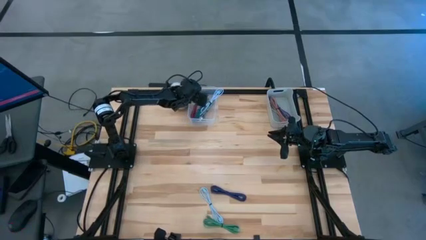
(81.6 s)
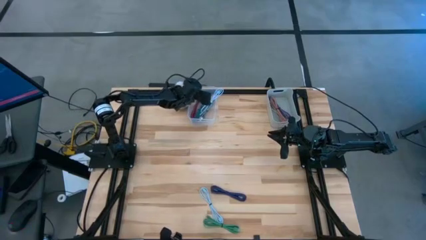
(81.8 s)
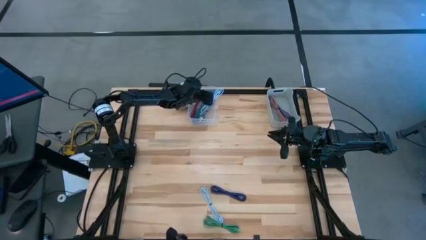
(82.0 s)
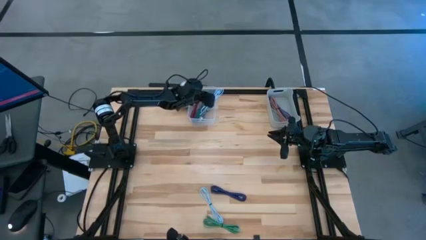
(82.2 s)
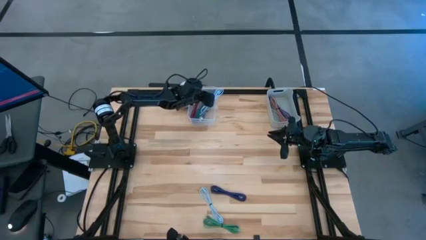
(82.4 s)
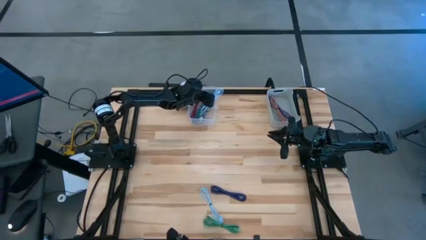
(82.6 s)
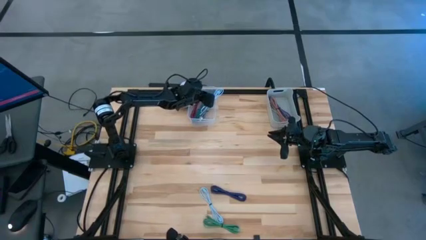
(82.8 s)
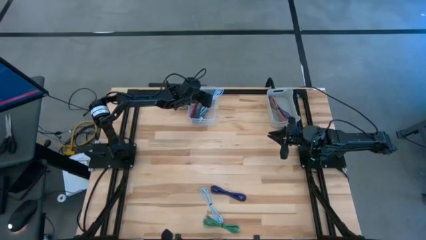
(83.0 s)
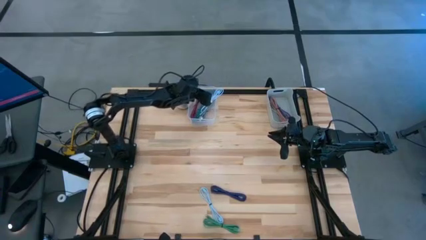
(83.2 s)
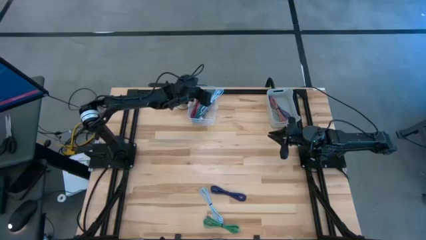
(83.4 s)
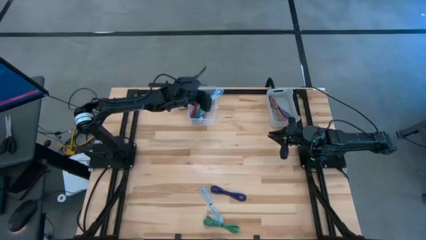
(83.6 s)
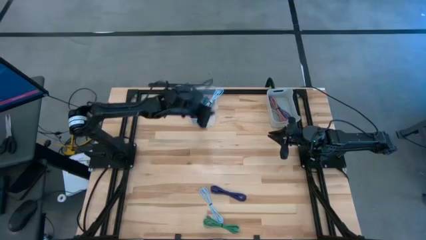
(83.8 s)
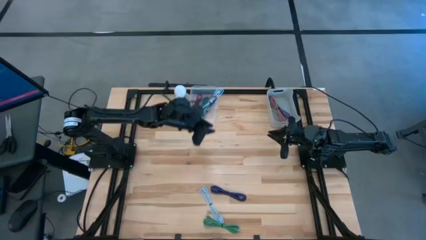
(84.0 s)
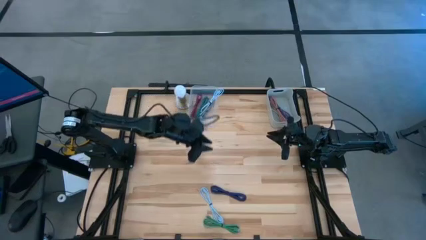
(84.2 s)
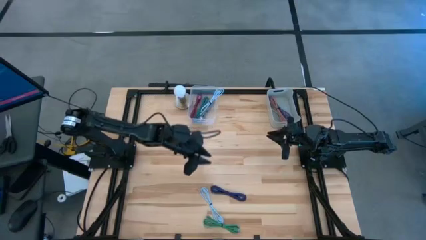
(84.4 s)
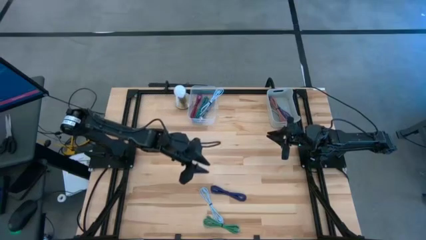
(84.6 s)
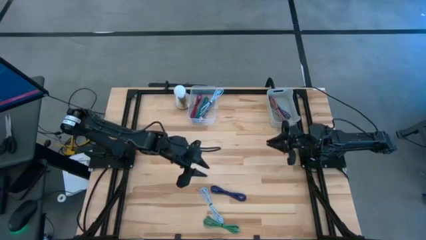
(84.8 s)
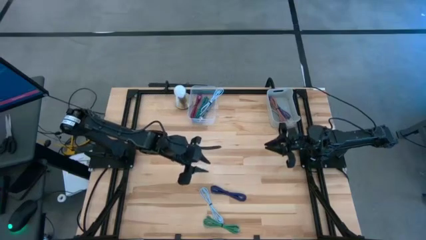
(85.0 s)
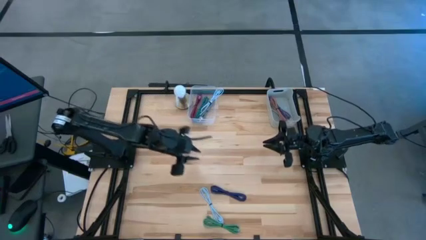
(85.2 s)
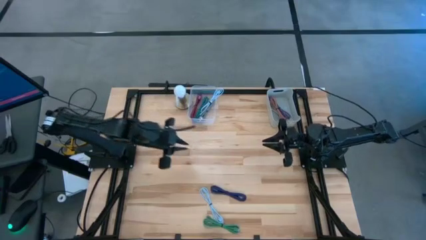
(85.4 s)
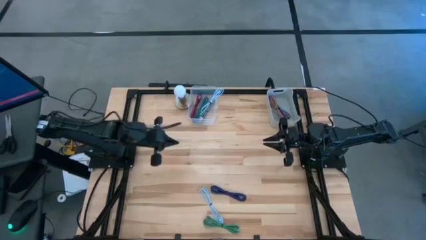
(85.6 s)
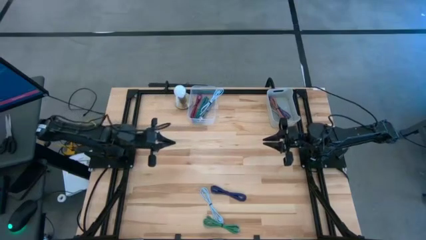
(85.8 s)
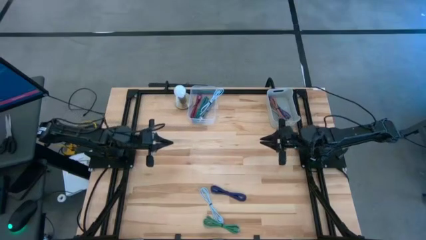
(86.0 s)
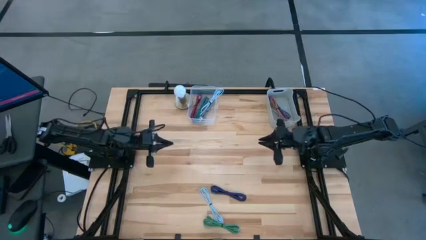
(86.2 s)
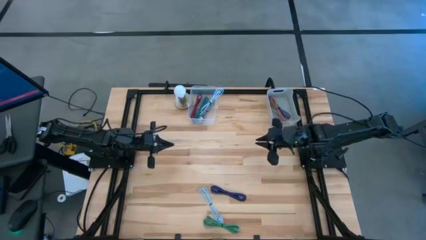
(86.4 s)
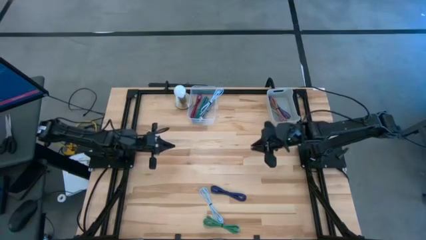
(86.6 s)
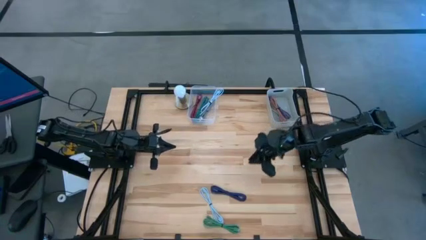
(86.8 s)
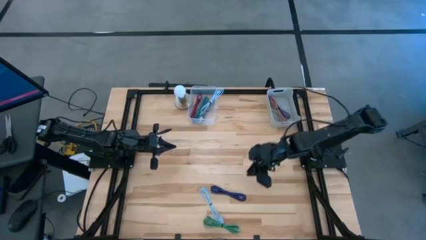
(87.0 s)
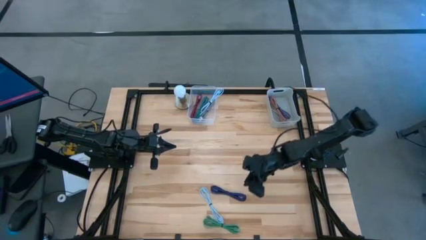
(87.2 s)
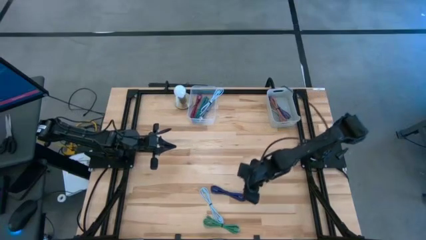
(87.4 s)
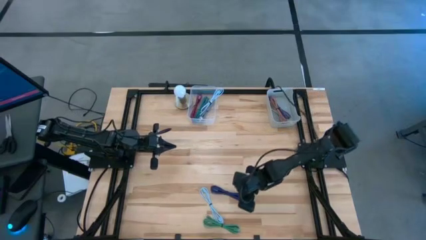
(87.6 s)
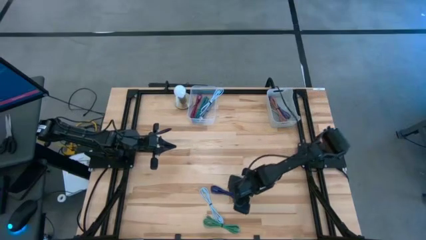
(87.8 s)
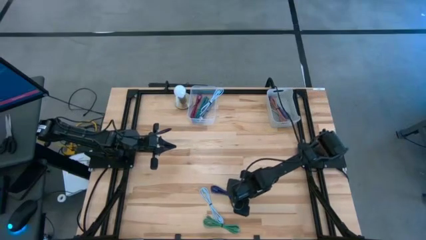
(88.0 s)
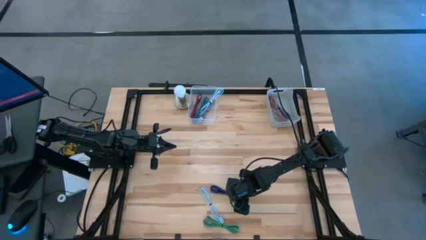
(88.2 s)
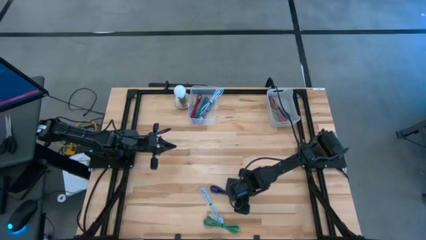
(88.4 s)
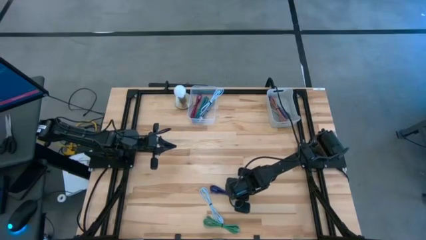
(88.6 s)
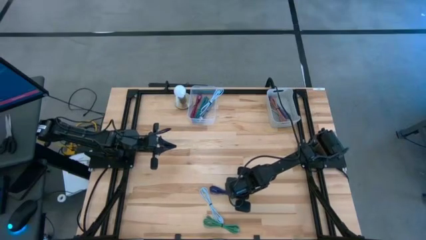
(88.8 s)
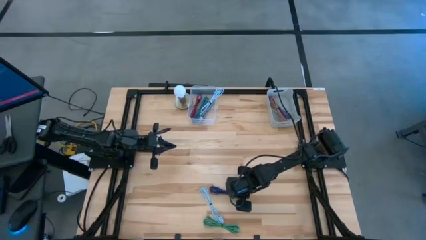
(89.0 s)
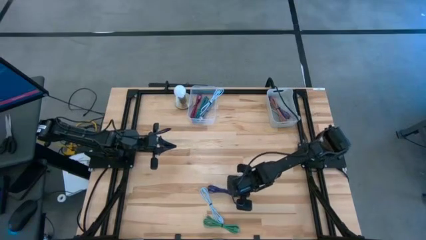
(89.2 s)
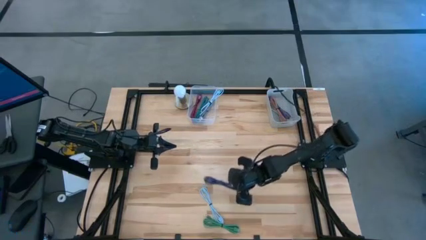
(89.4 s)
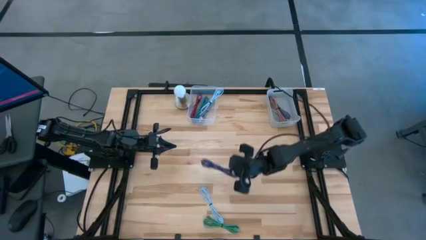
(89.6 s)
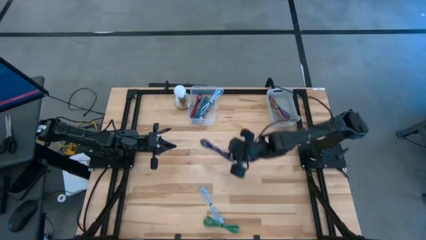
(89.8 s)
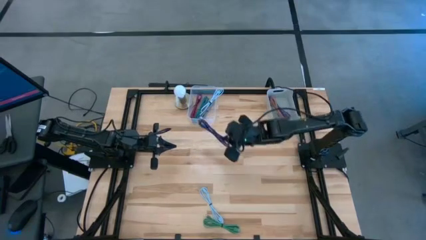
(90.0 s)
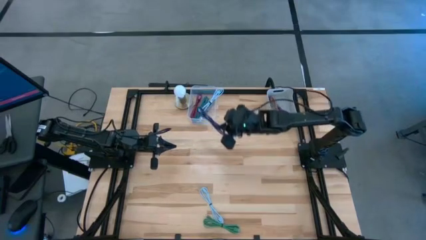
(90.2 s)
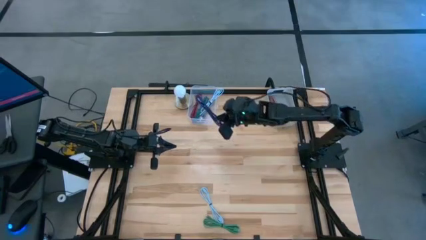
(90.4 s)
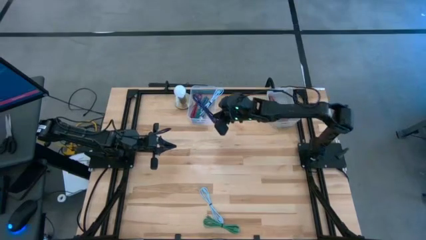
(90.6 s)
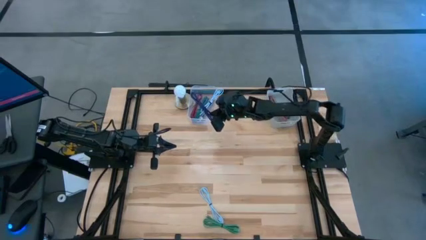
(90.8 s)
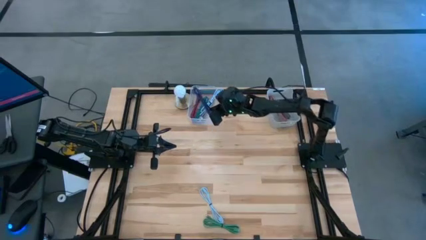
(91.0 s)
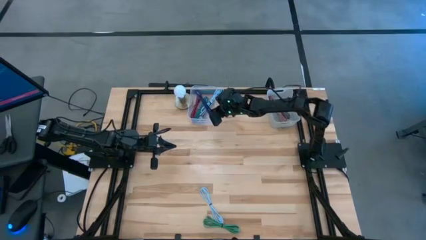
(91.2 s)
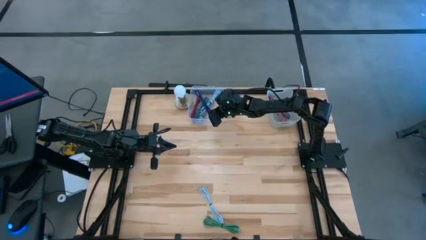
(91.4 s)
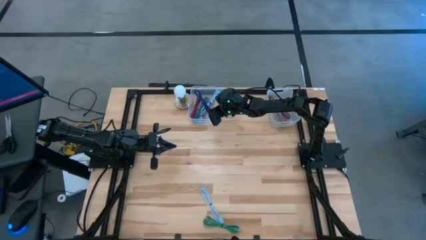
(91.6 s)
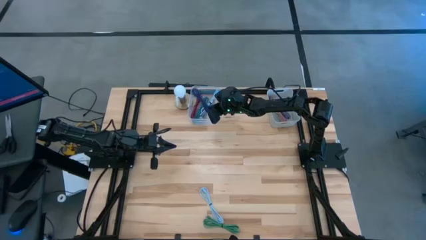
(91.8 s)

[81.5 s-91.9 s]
Task: Pick & Place USB Port
Put the black purple charger cable into the transparent bin

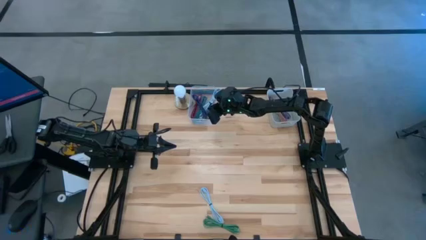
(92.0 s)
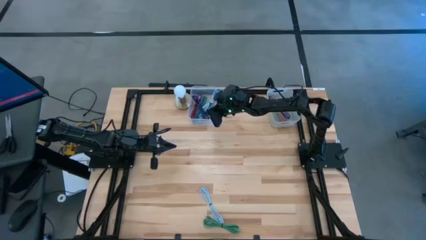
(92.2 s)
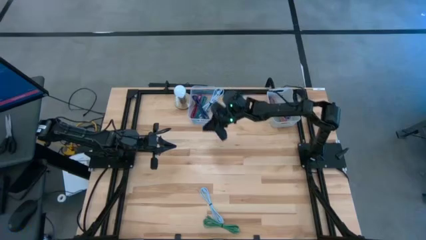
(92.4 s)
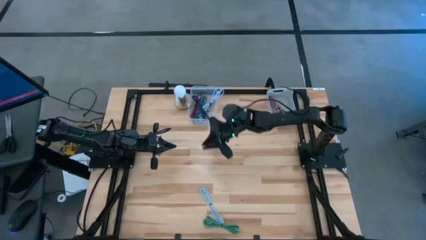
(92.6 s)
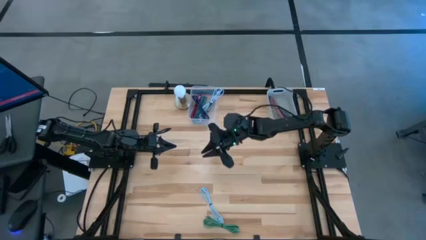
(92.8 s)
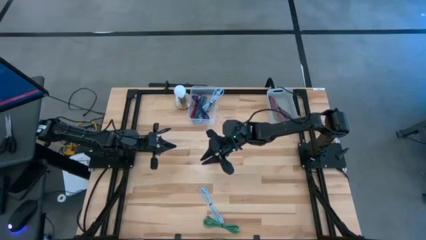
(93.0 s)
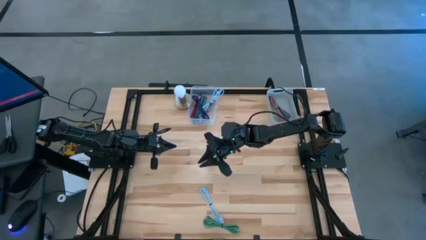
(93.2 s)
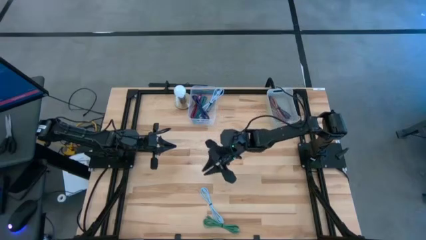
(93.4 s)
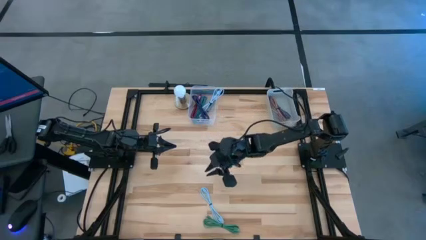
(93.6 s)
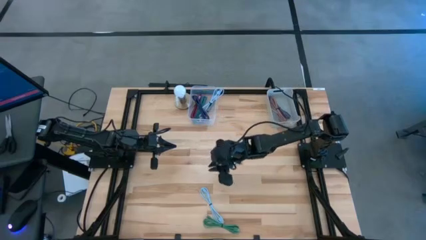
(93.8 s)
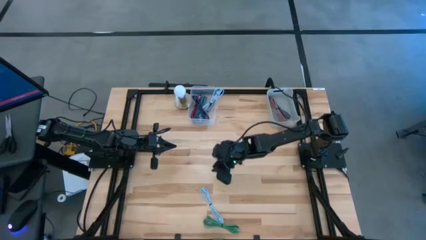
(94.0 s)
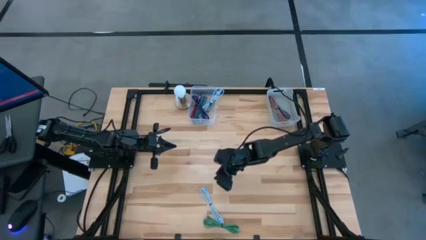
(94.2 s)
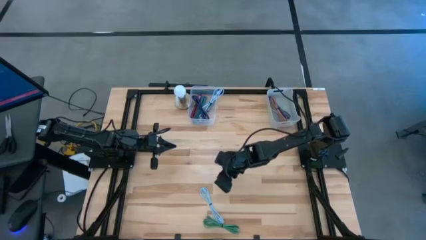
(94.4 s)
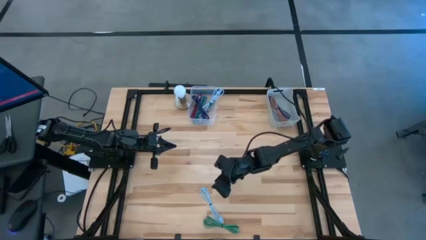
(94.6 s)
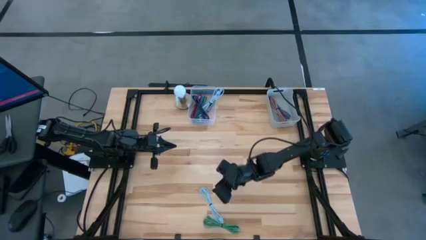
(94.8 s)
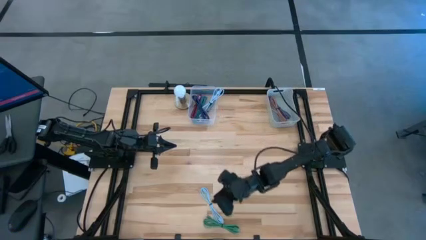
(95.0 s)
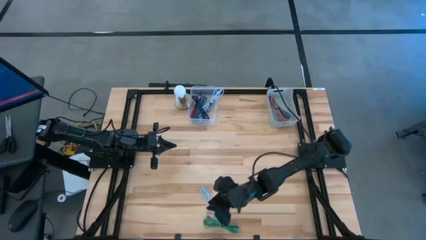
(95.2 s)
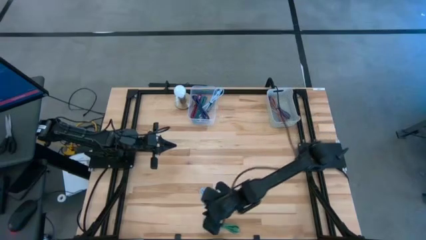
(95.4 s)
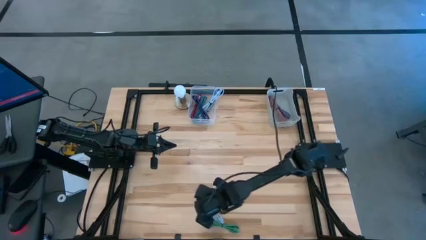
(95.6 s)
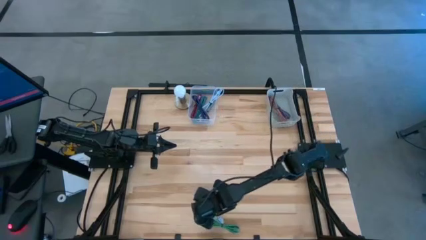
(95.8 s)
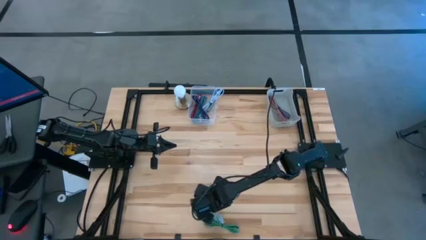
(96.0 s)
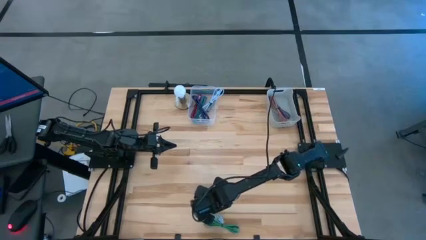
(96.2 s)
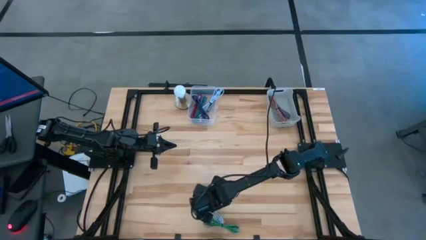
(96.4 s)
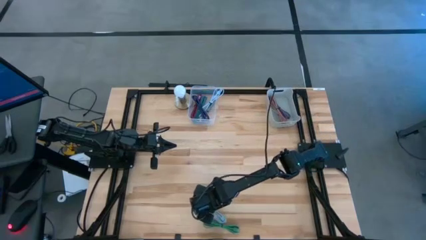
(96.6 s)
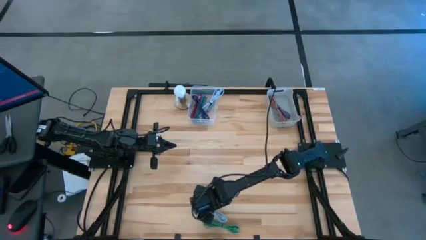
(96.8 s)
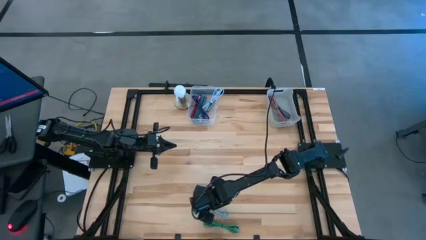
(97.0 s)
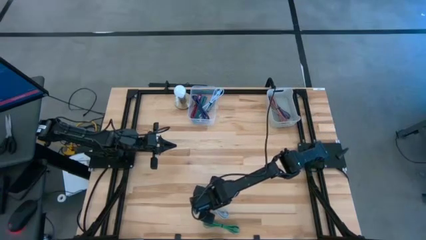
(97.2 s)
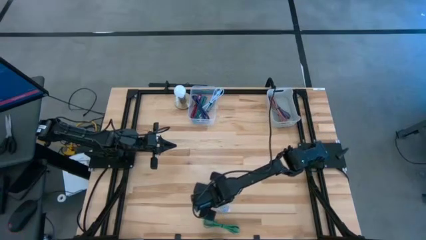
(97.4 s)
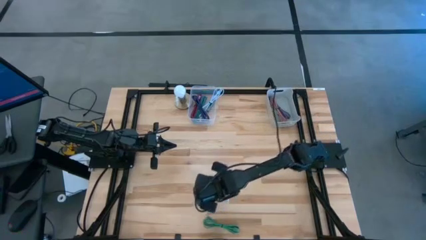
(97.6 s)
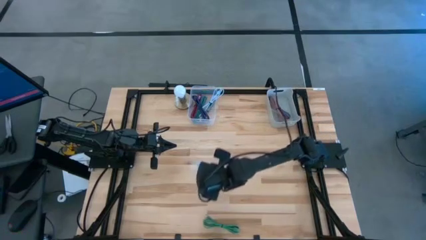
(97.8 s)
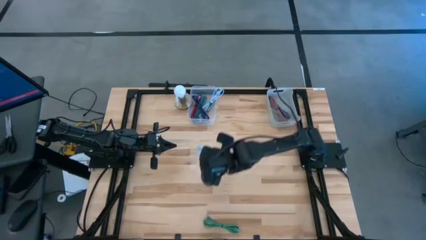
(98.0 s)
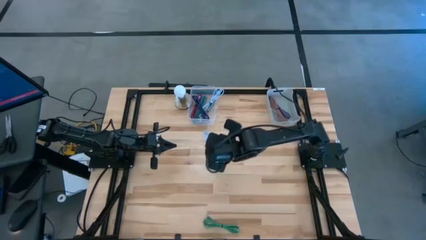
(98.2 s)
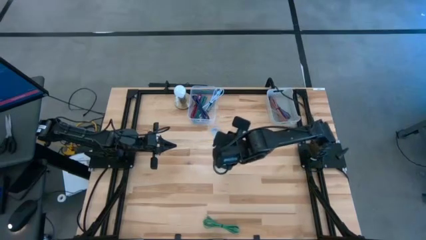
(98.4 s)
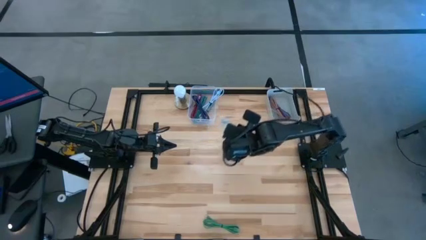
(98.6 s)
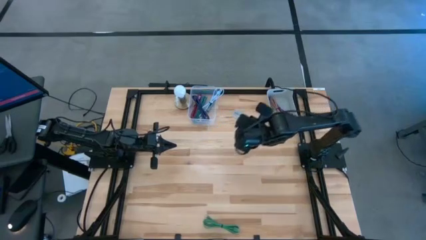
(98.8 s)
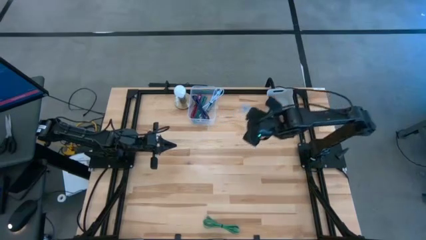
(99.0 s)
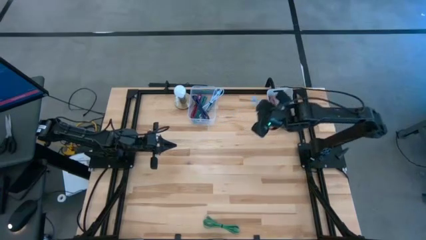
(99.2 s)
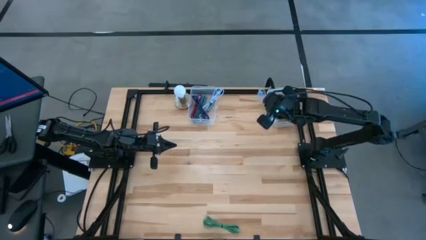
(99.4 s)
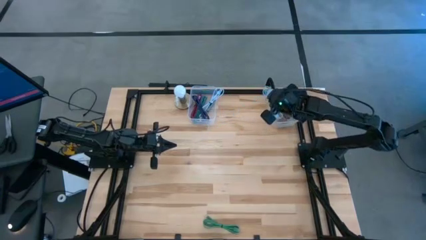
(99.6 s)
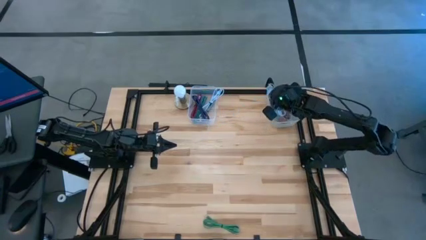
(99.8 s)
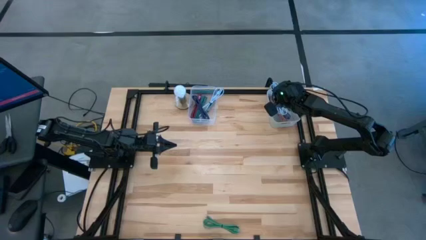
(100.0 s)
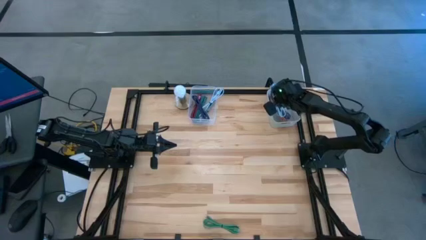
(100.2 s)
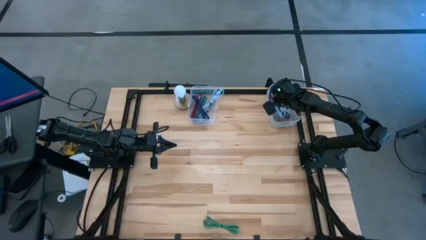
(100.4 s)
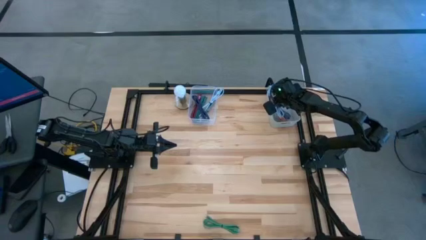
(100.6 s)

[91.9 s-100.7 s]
Put the light blue charger cable into the white bin
